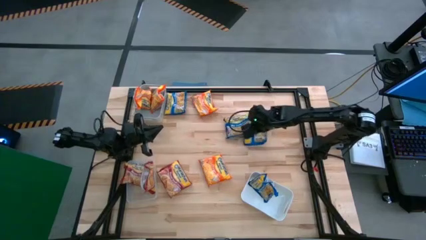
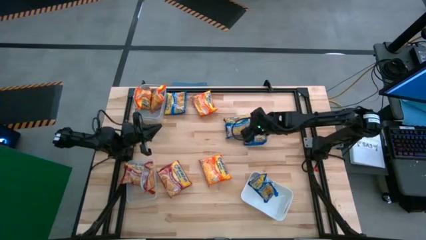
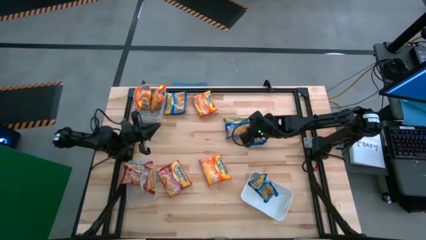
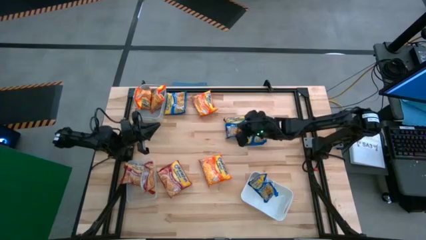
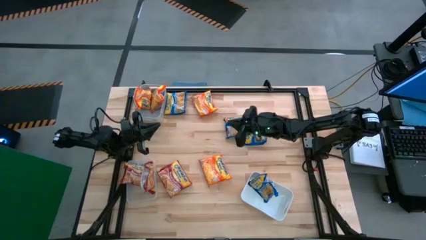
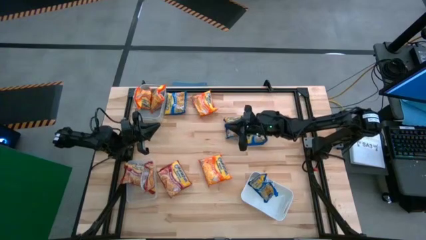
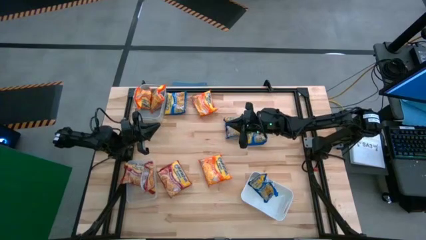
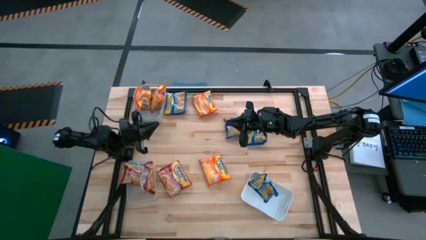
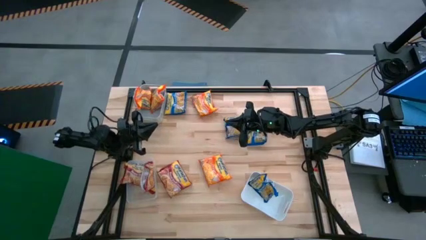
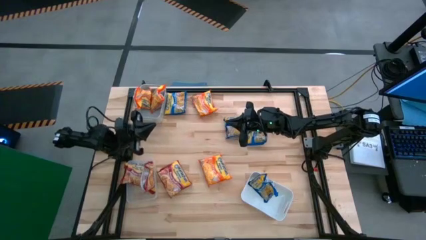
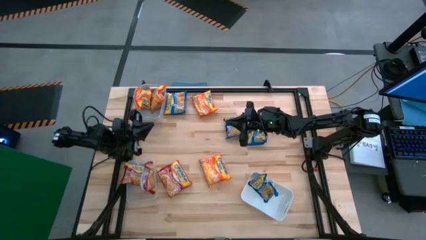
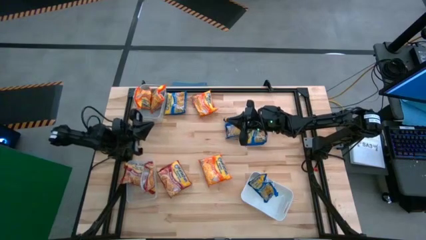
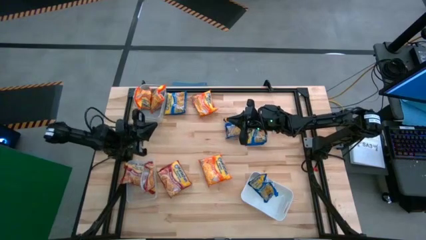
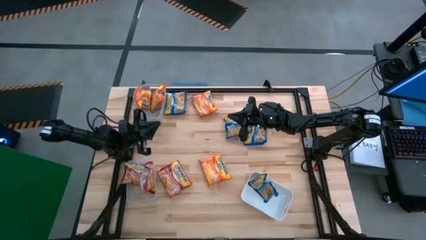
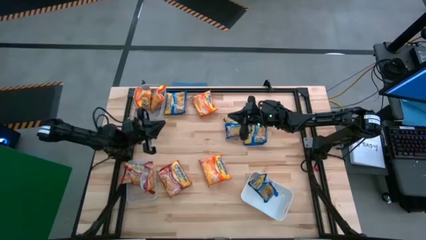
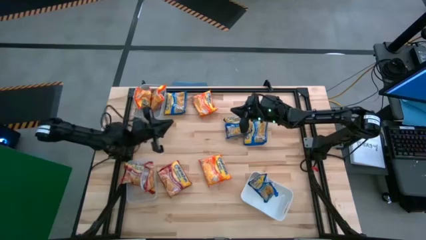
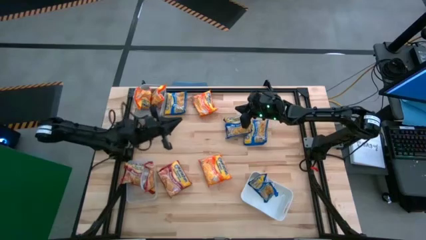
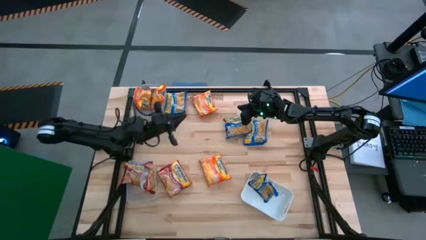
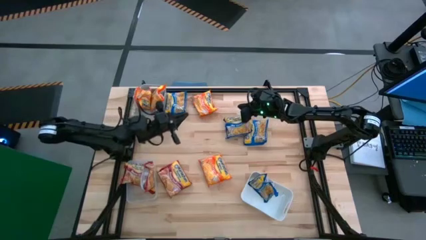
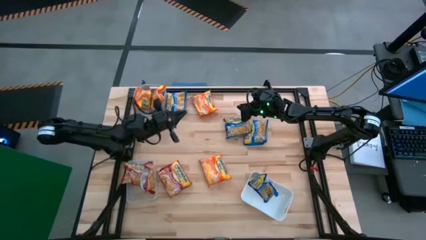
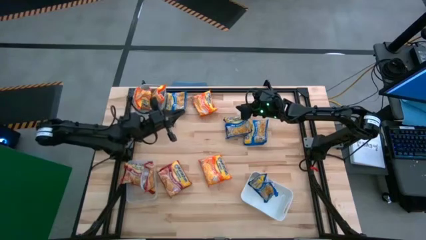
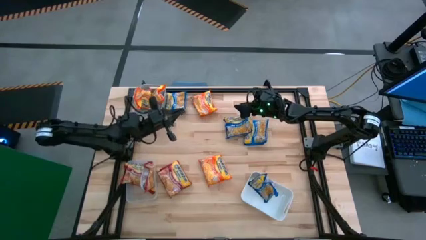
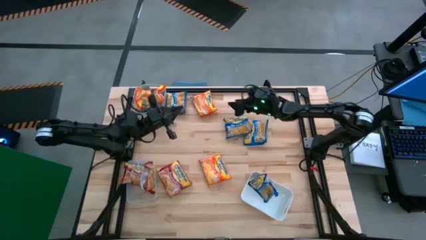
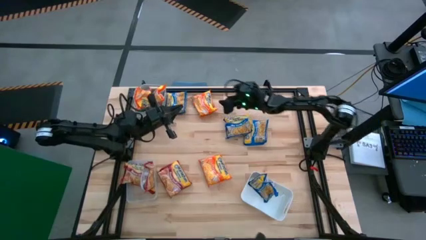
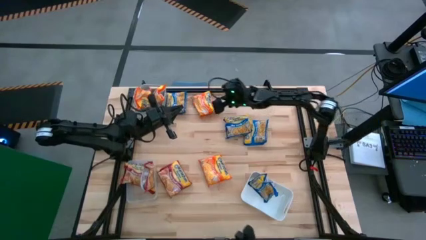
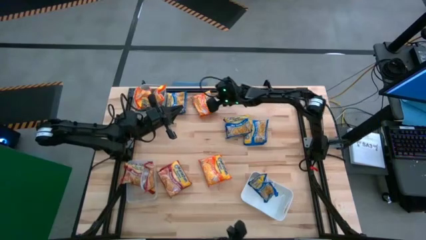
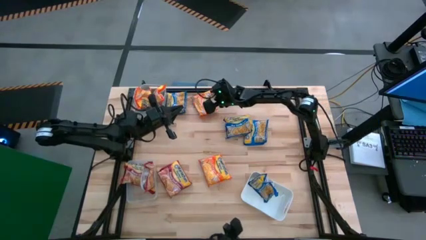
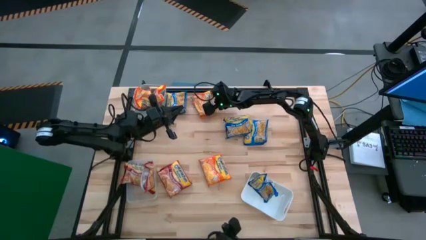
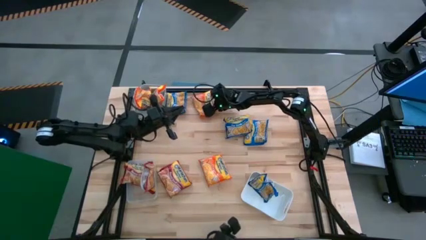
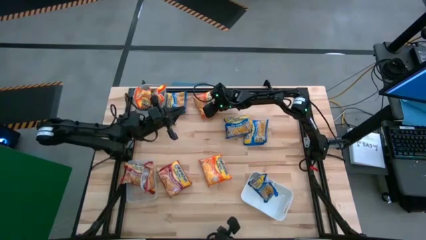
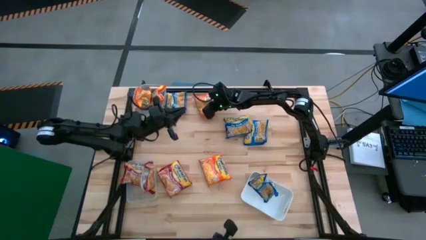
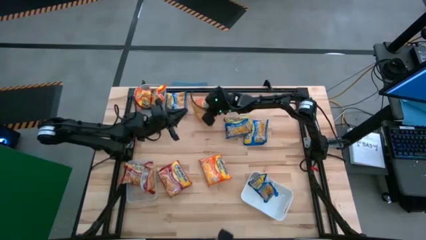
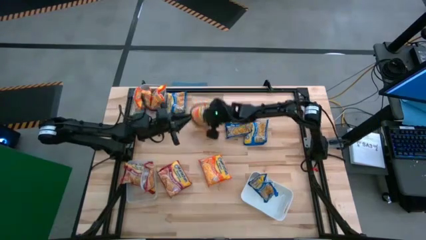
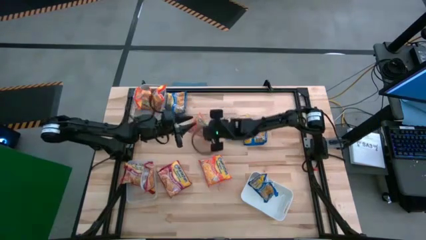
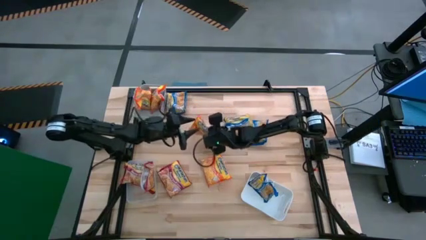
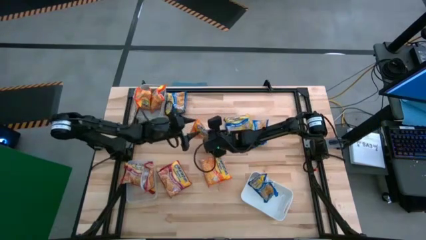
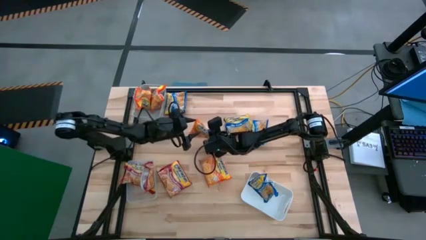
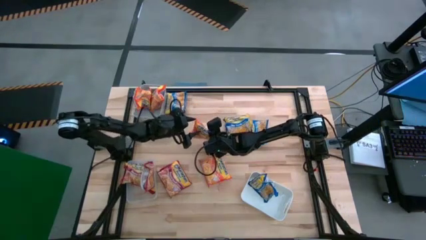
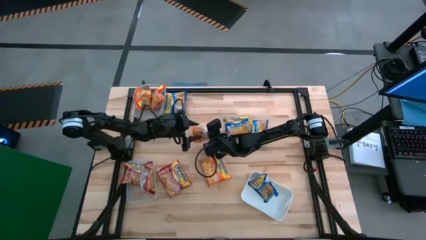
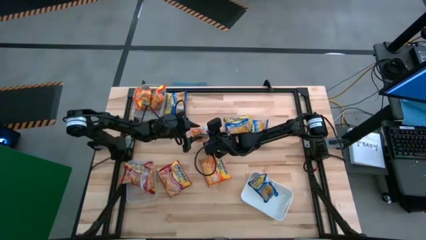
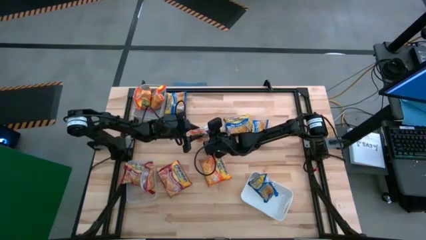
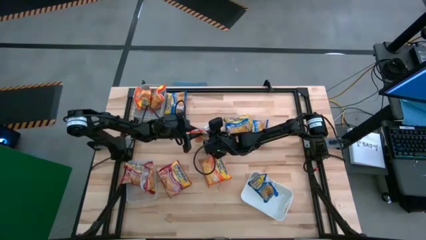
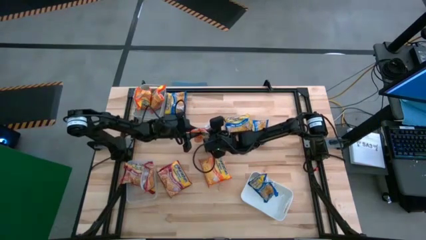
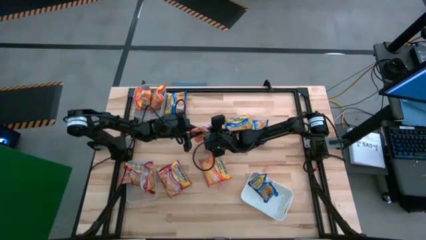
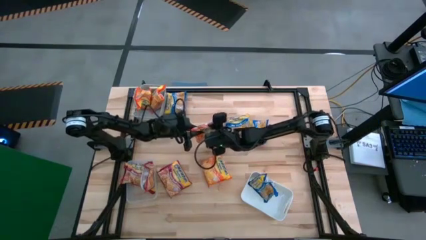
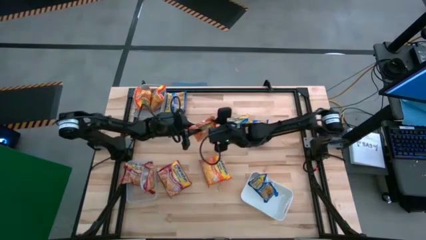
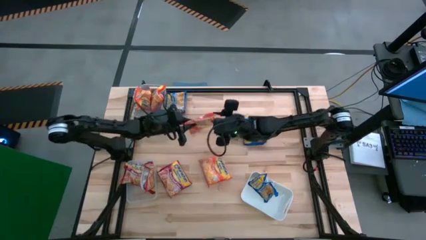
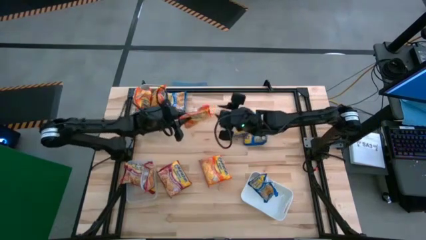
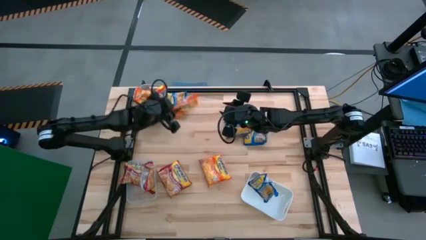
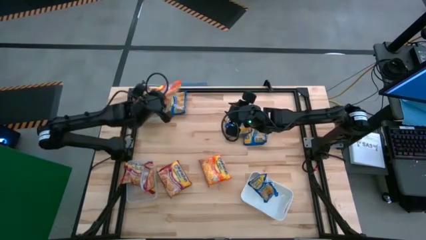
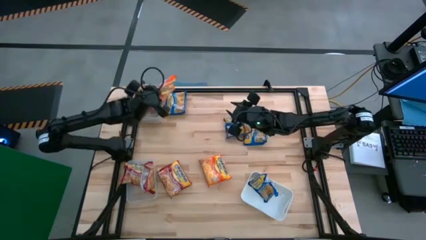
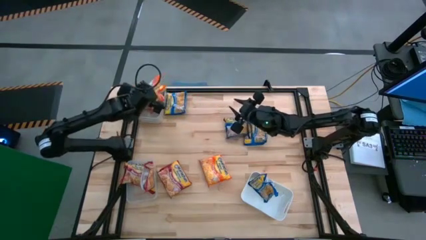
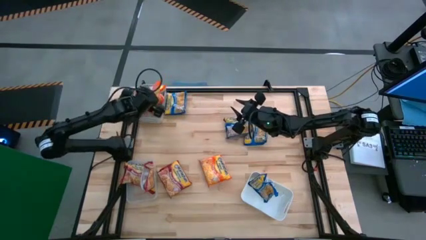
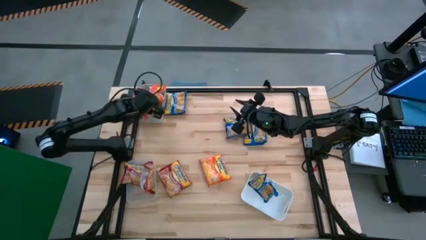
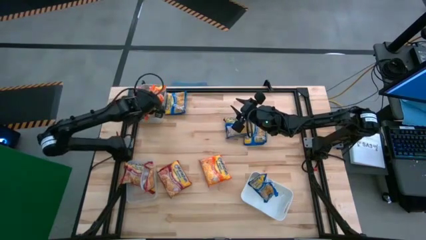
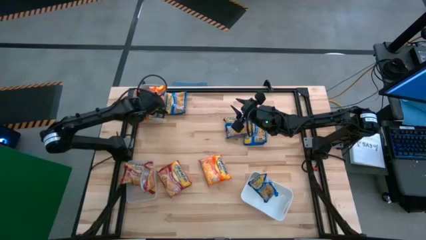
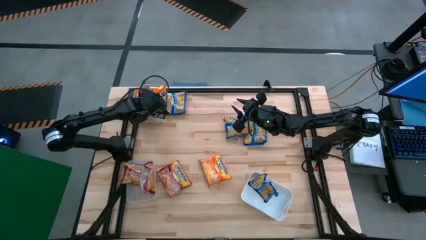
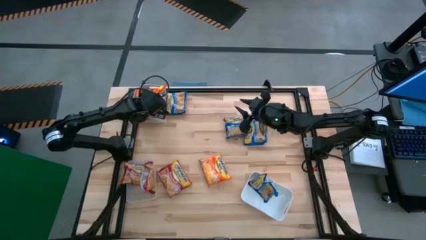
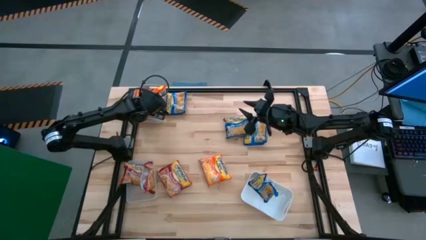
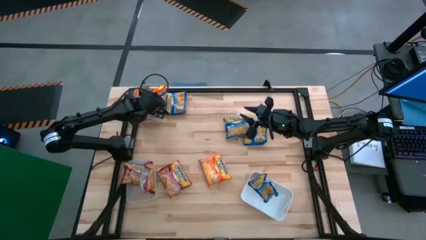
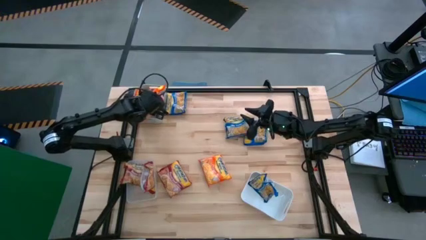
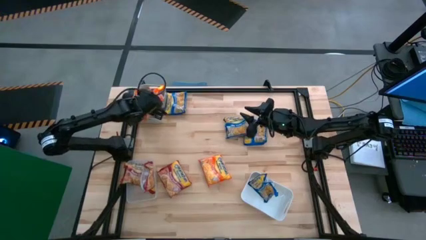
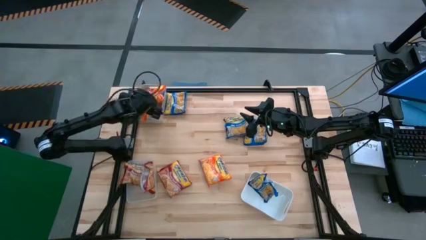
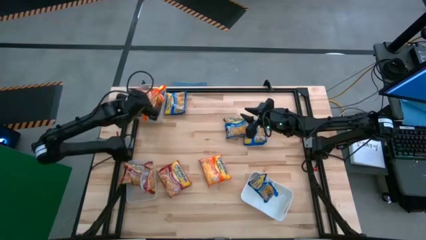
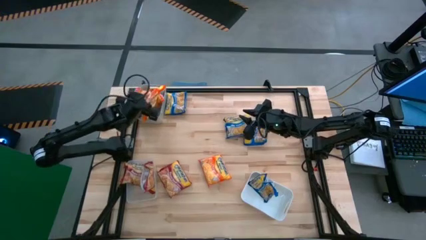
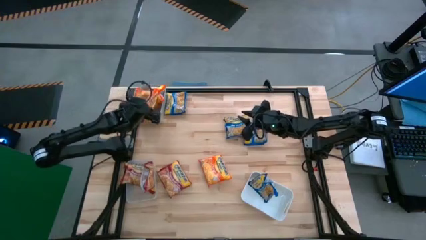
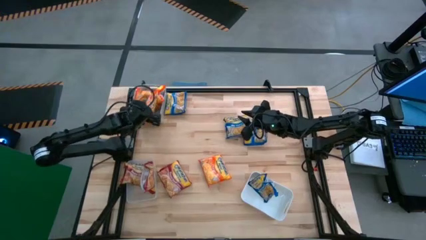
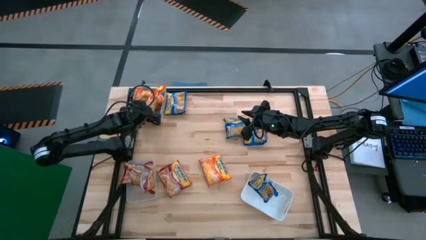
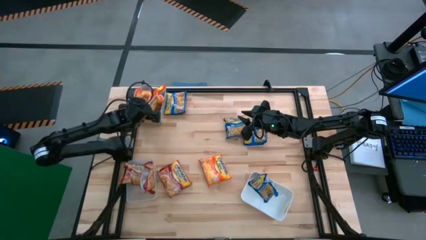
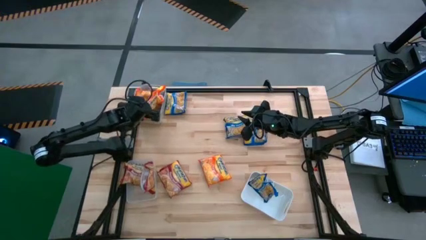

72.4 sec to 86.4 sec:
Task: Sort Maruchan noodles
Put the orange noodle pack into the gray bin

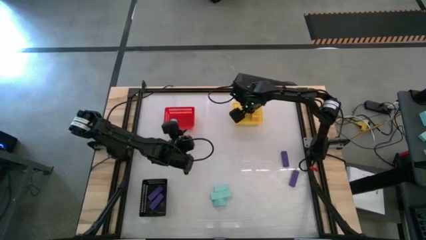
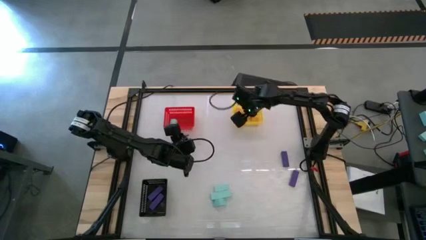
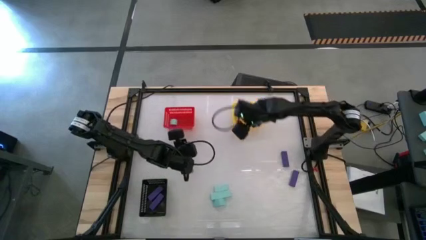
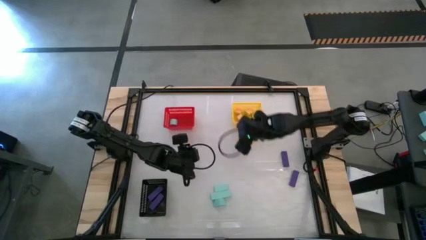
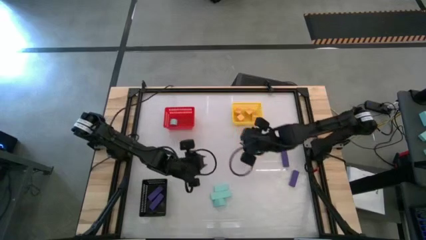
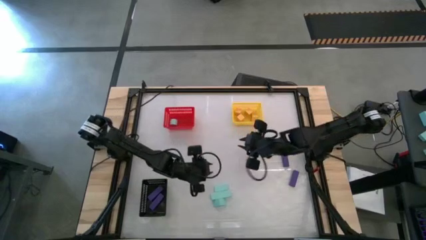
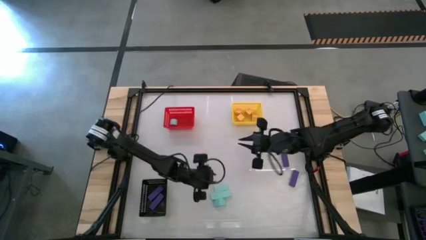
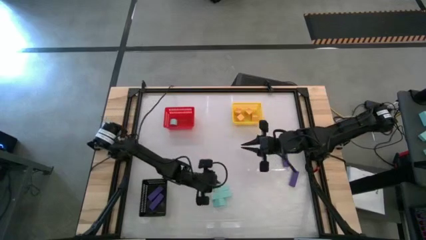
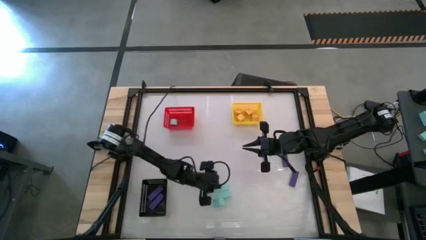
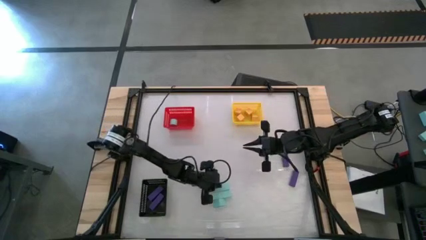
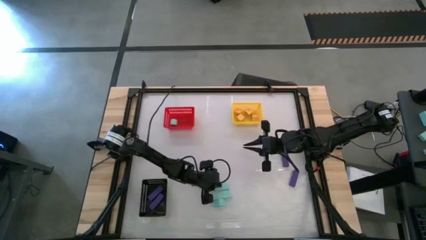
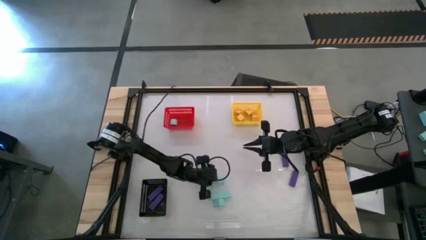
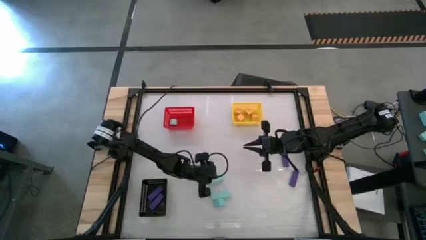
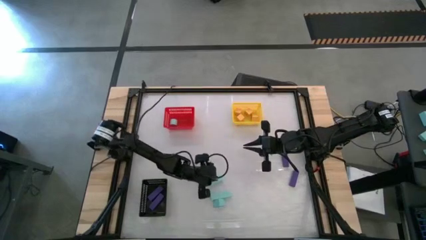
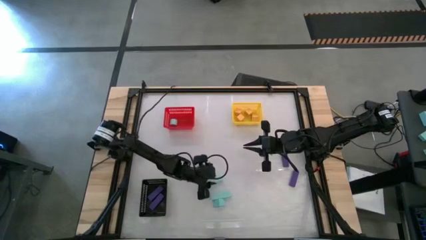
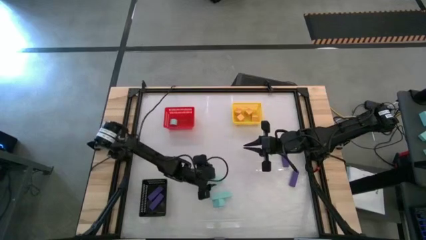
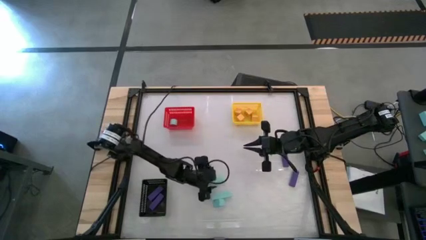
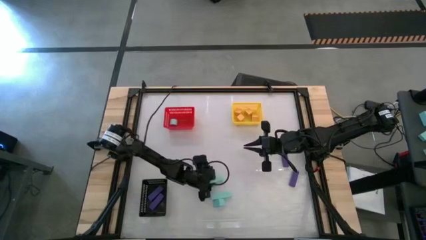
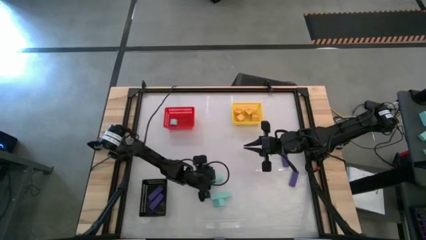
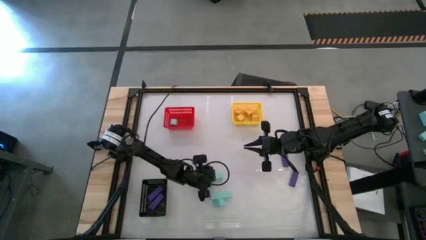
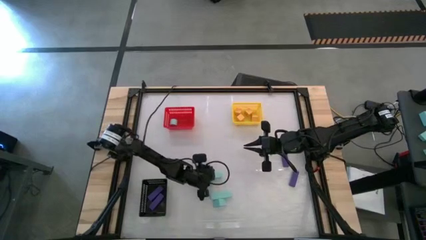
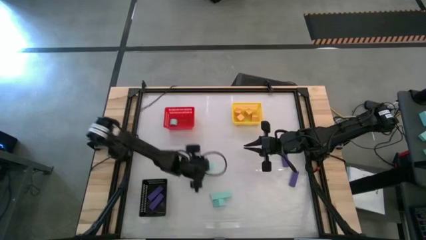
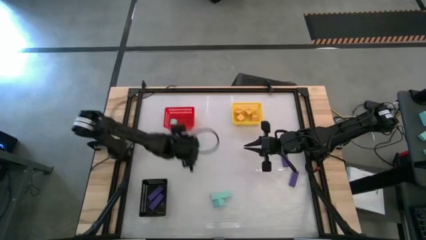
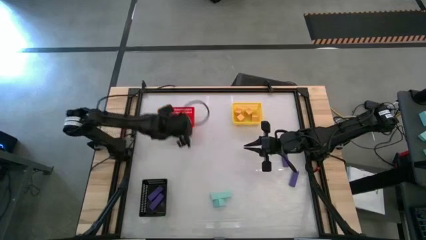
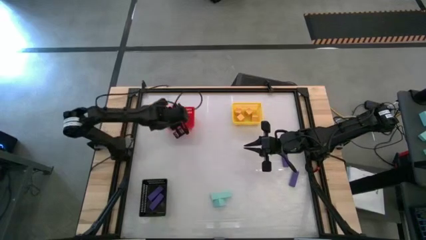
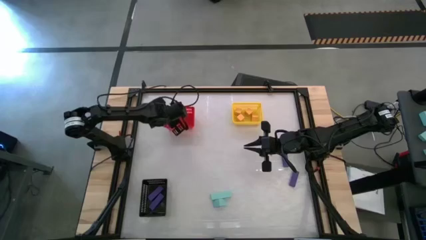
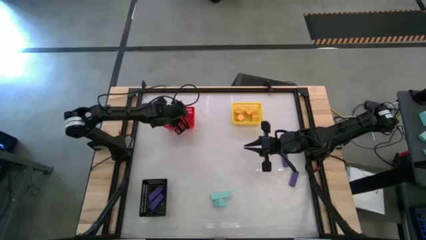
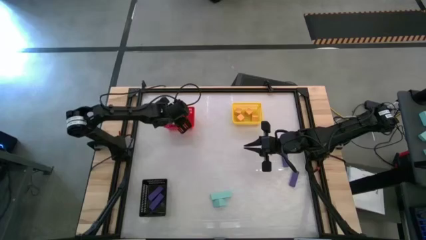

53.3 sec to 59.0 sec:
Task: Sort & place blocks by color
Put the light blue block into the red bin
